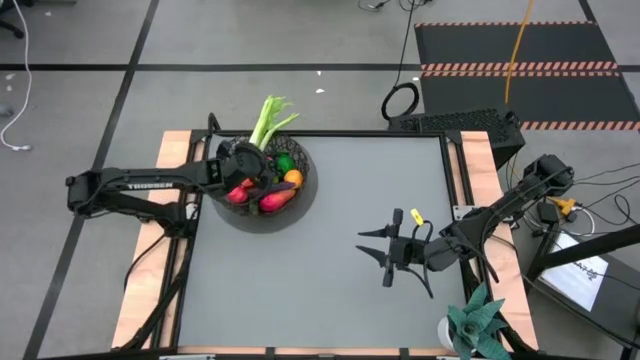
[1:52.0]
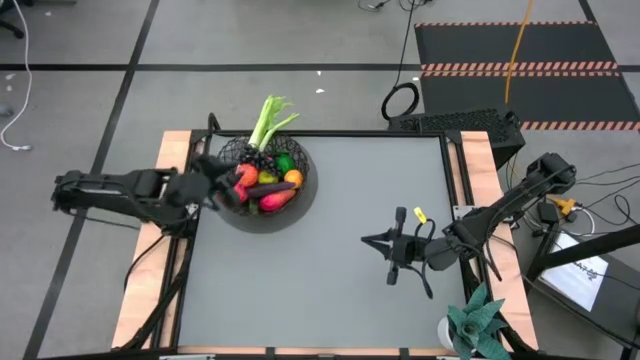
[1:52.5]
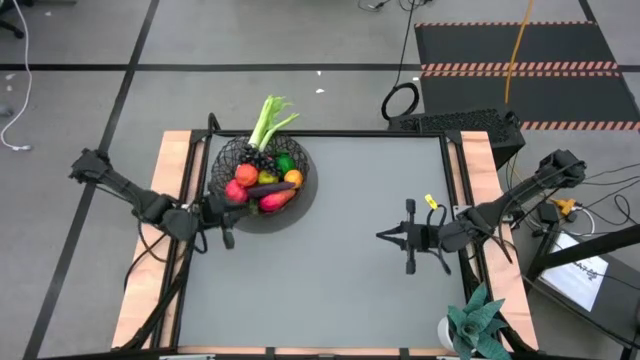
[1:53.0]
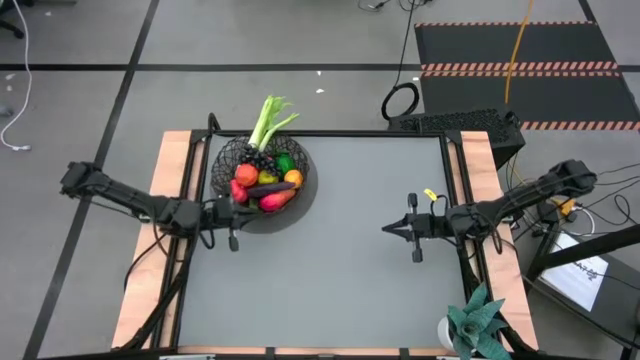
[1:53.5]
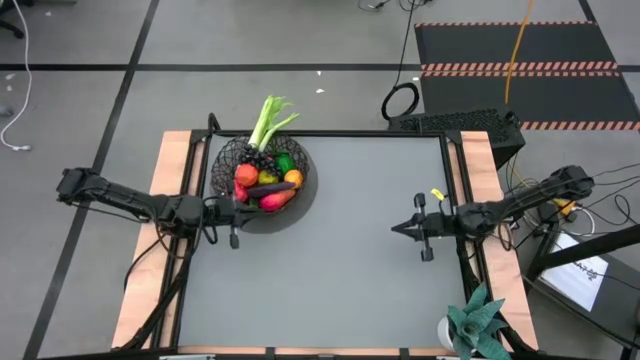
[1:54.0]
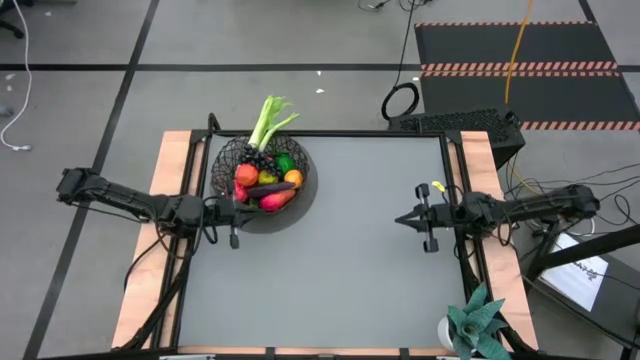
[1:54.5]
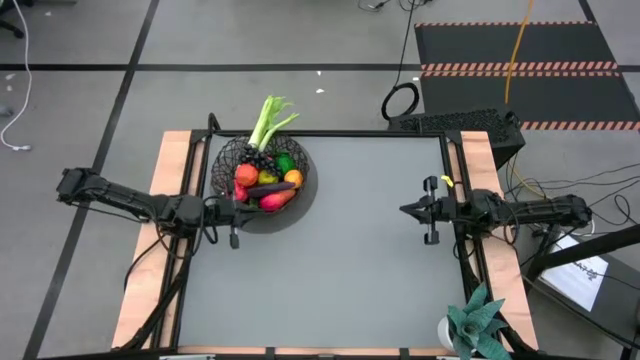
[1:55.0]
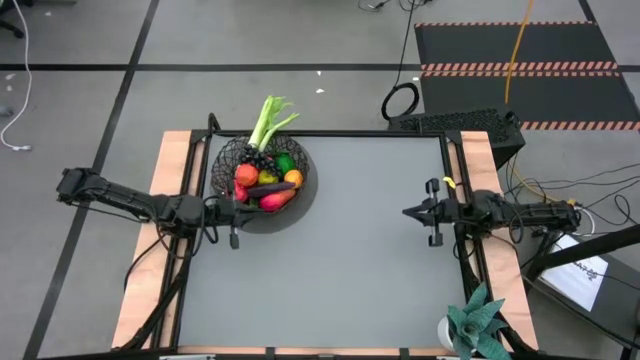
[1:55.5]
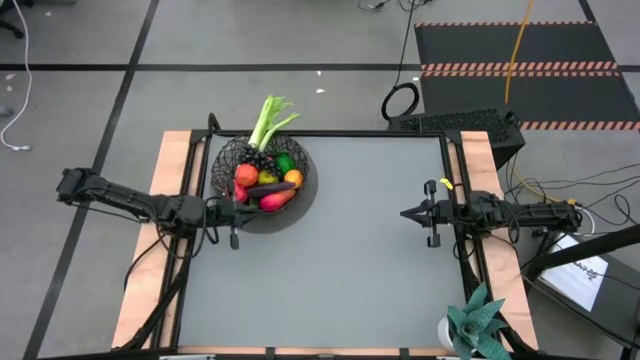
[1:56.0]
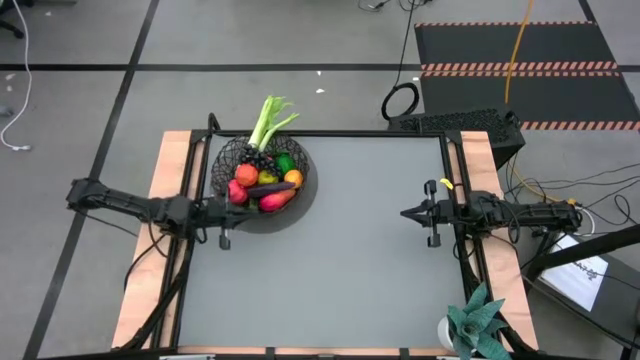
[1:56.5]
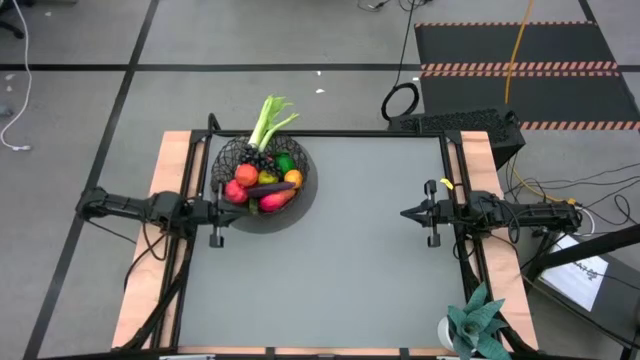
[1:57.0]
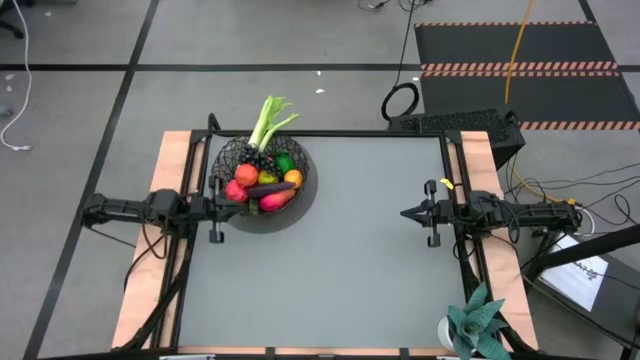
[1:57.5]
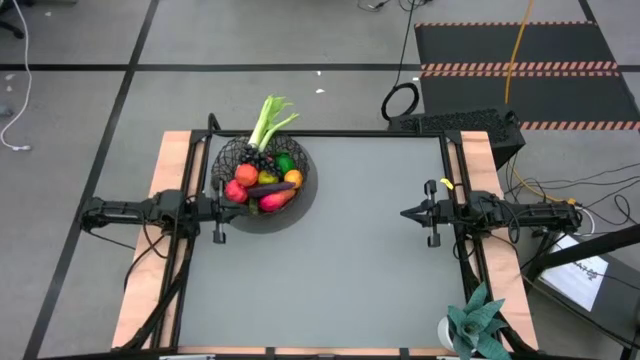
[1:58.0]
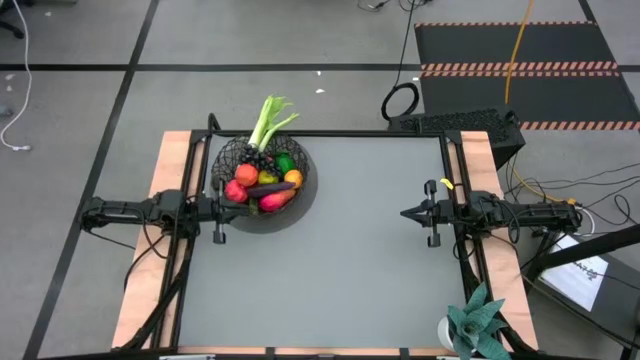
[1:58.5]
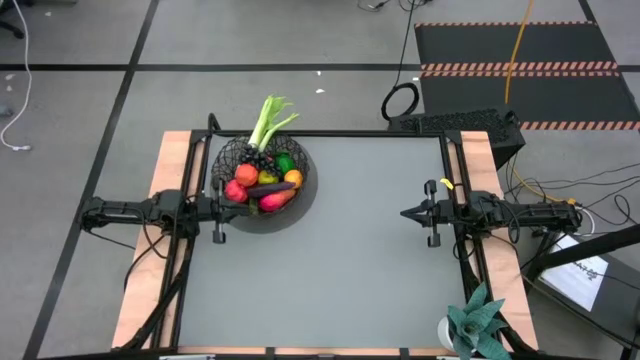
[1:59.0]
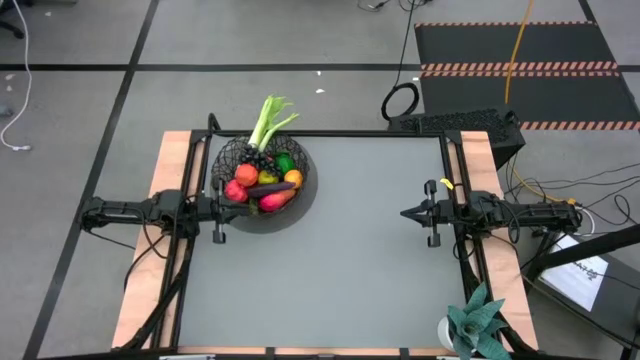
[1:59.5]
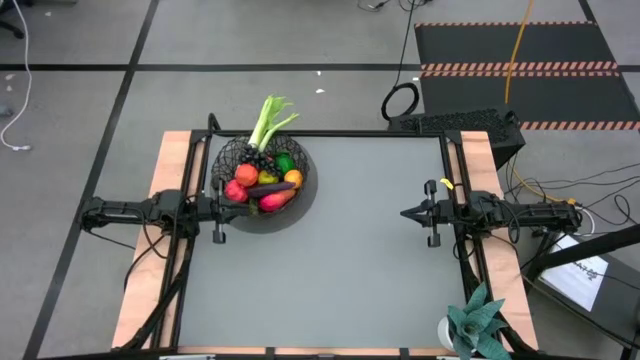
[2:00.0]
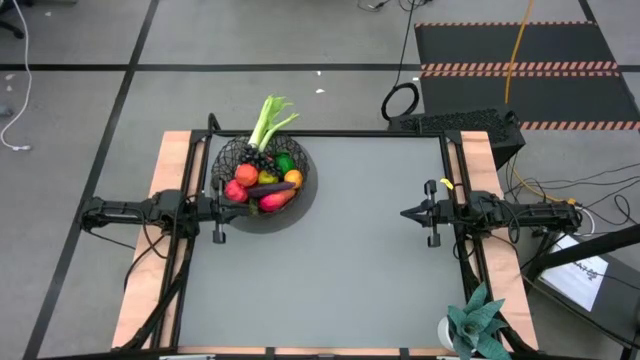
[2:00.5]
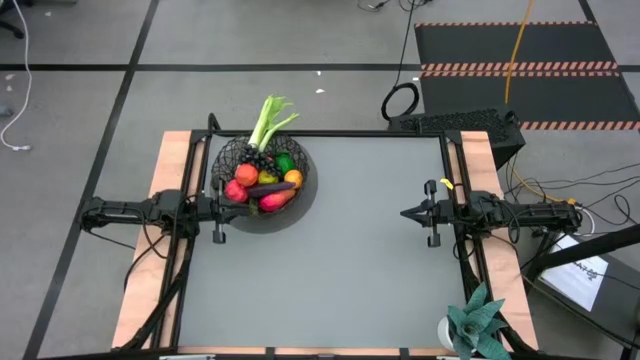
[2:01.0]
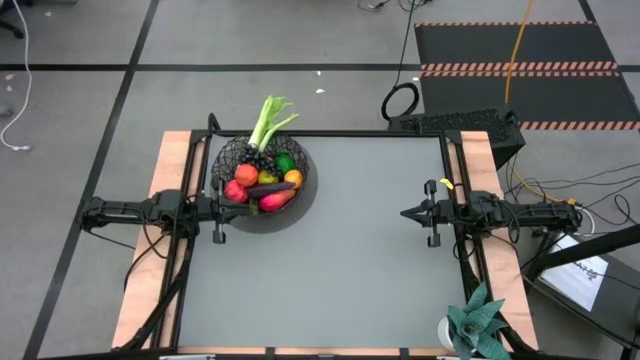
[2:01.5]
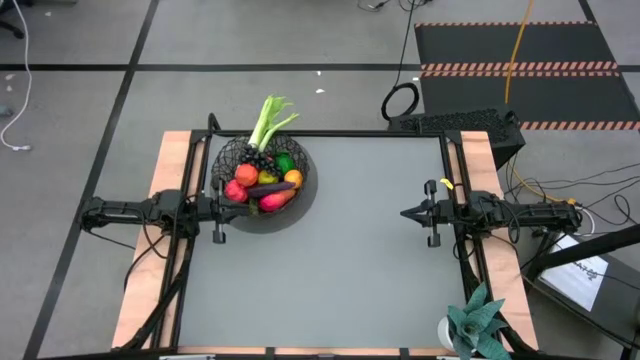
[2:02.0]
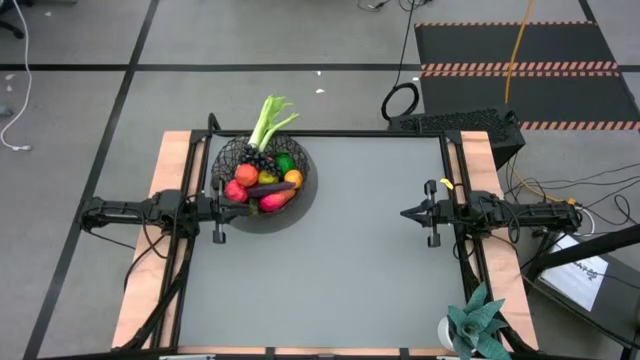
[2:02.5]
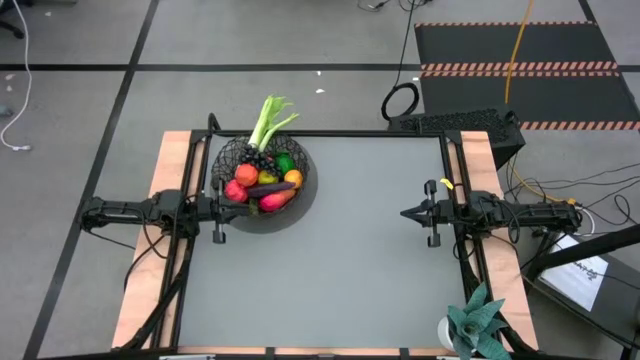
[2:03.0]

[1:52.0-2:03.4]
Task: Build produce basket
Return to Home Position

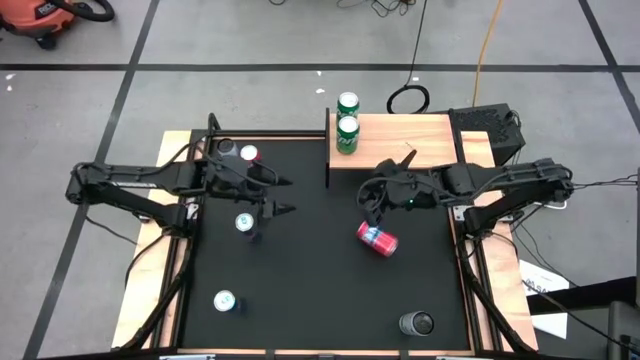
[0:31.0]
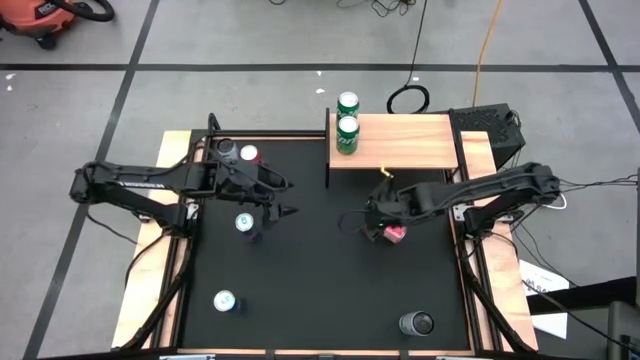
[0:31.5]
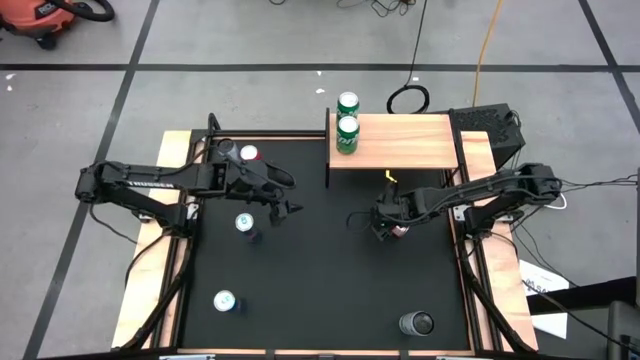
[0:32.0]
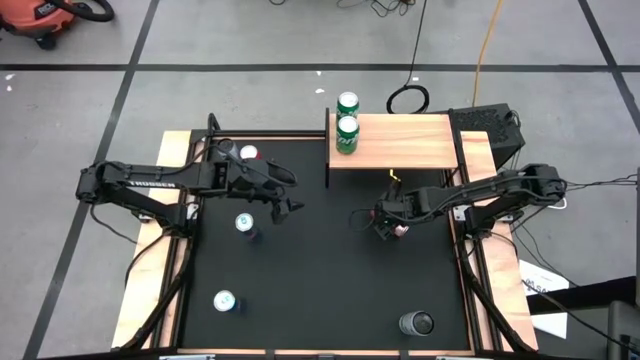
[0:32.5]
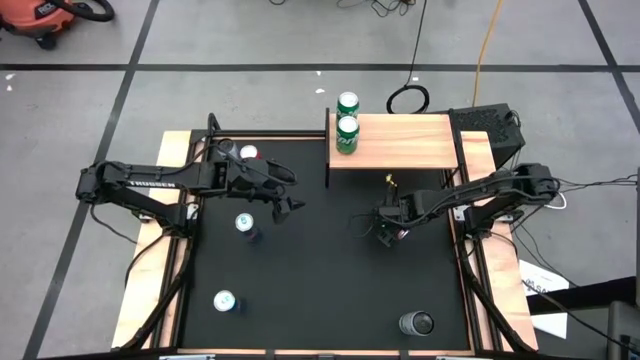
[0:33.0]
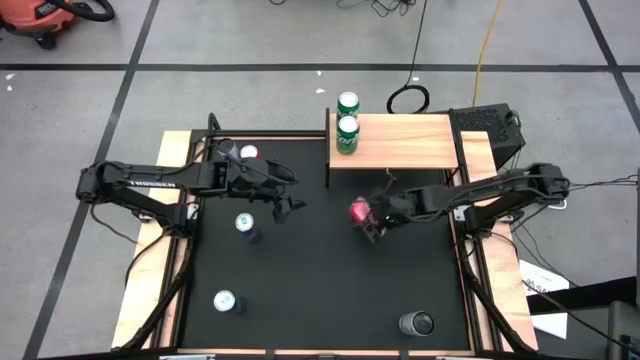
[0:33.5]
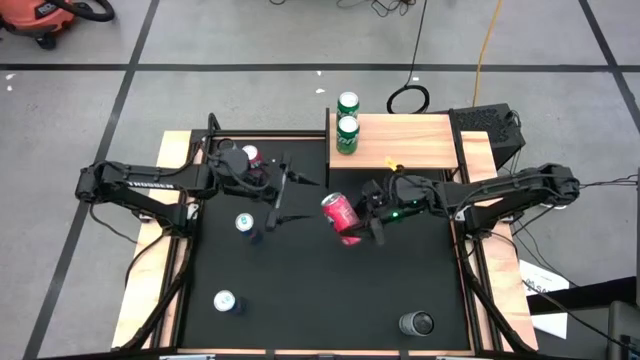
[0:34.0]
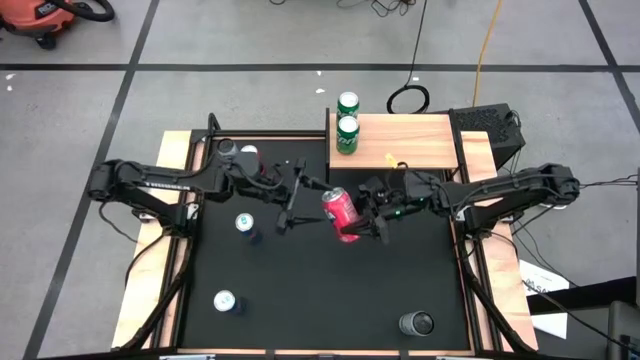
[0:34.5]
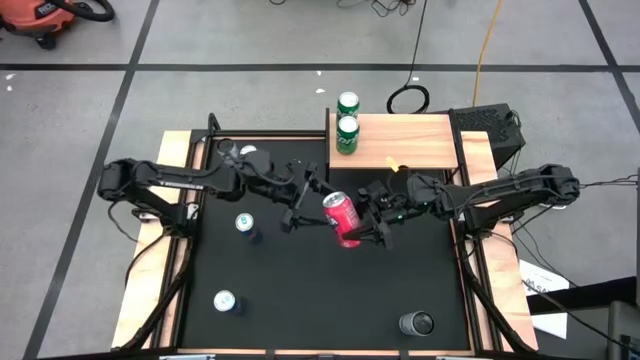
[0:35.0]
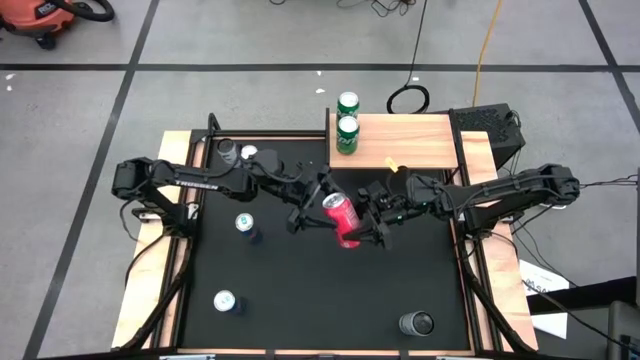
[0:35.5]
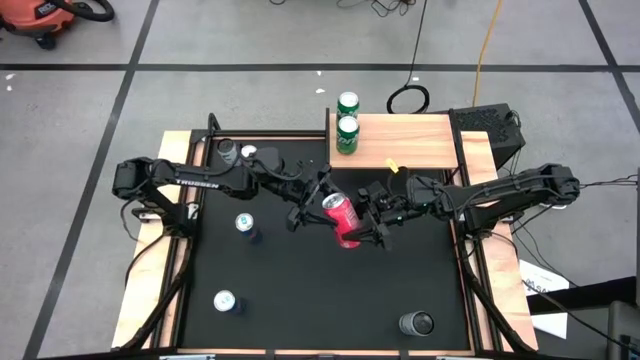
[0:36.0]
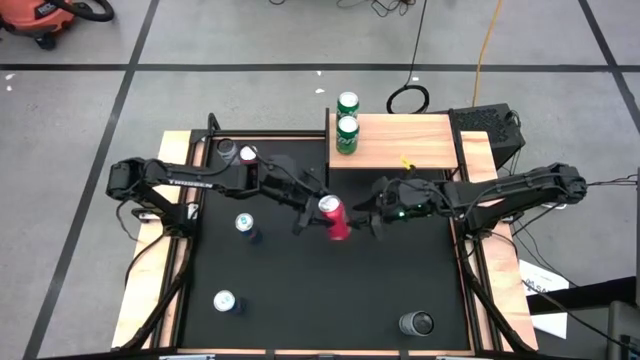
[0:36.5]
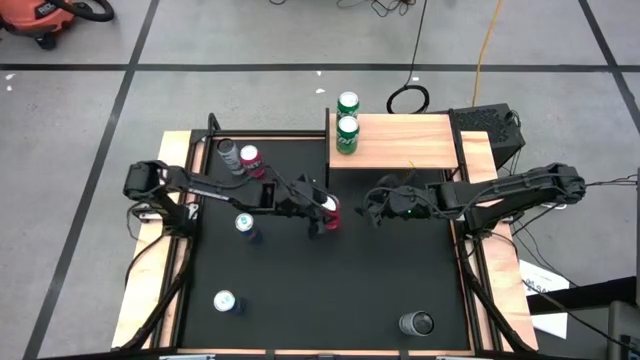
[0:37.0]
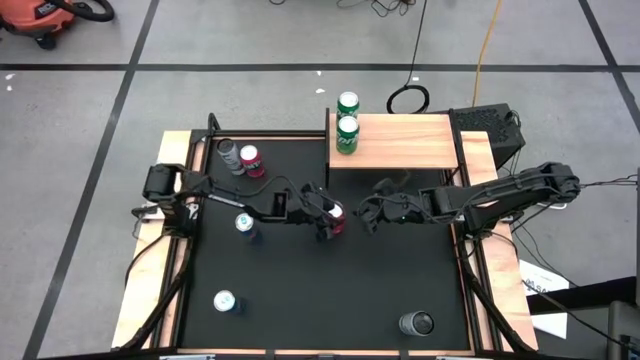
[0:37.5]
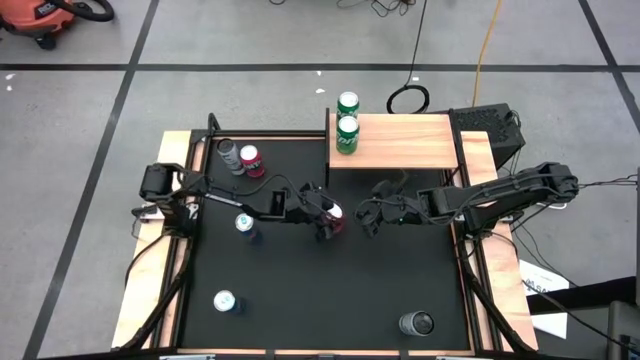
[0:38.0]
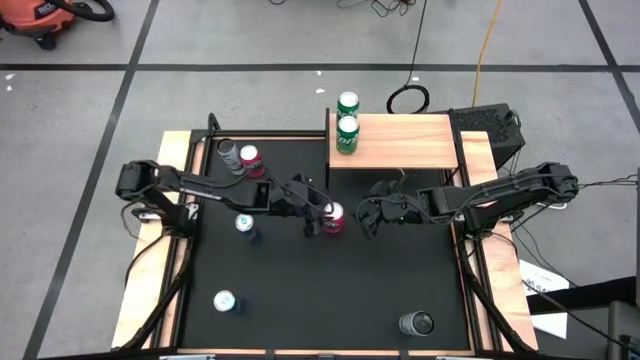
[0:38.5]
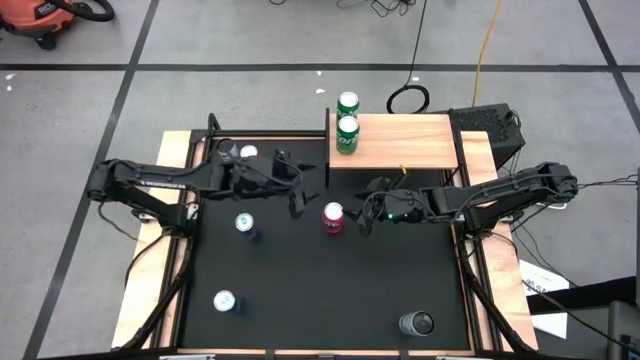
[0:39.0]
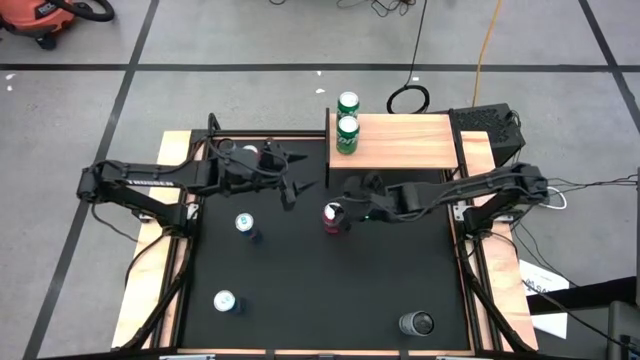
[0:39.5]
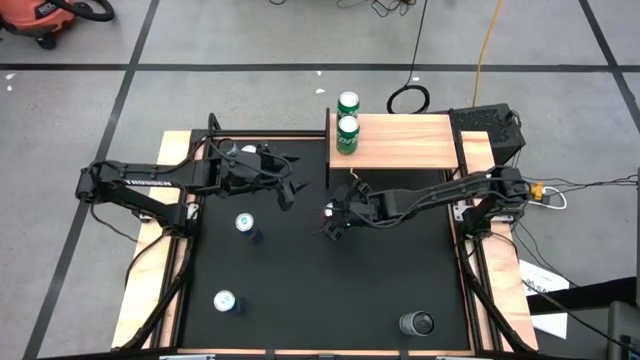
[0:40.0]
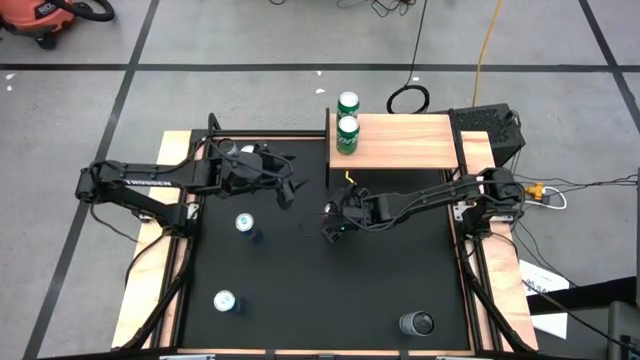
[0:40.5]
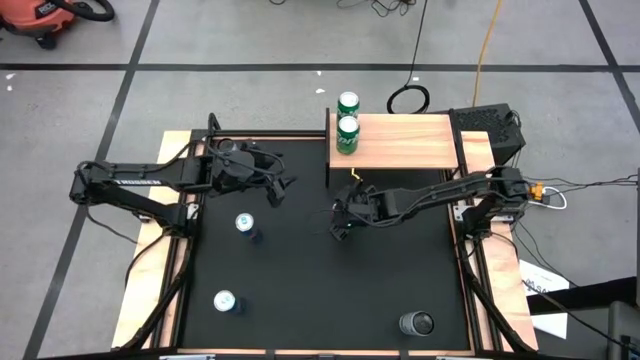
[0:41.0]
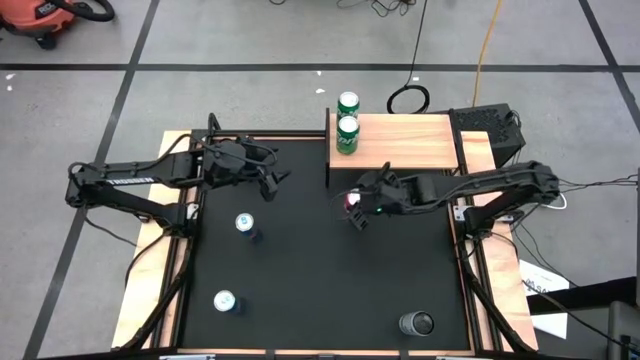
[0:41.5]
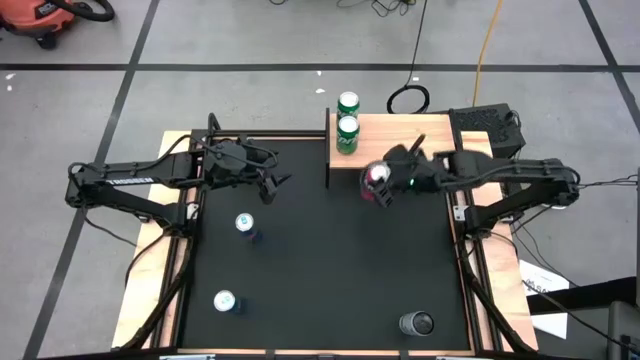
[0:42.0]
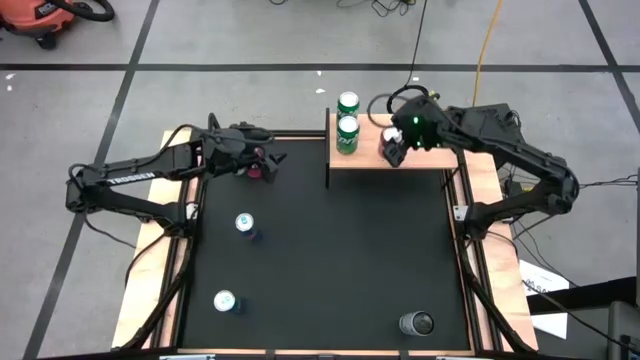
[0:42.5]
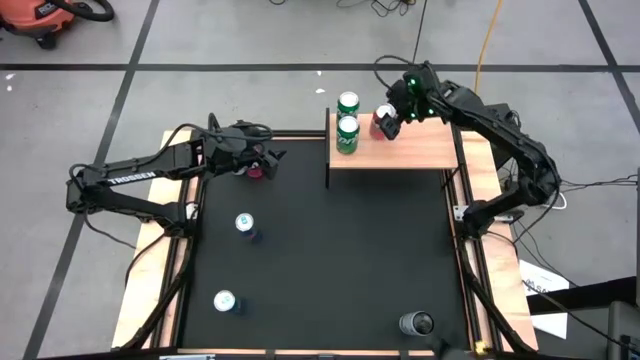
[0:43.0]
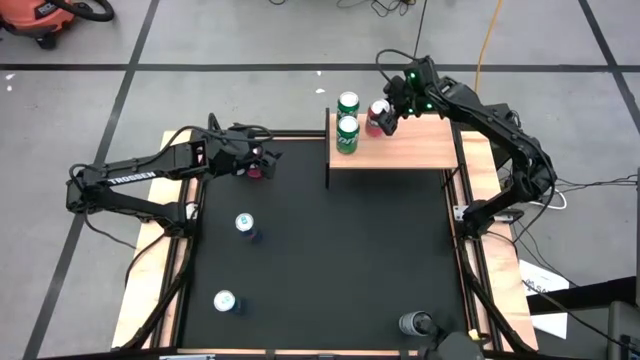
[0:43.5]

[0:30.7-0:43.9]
Task: Place canned beverage on shelf
Put the bottom orange soda can on the shelf
